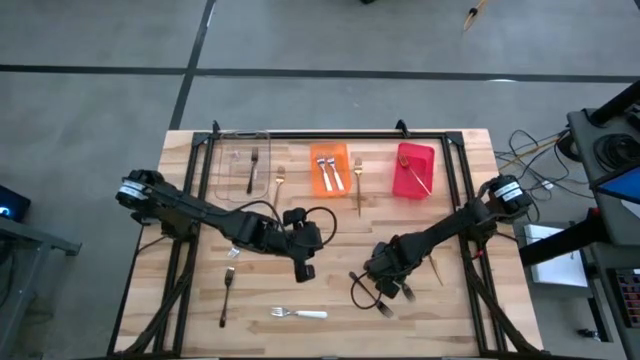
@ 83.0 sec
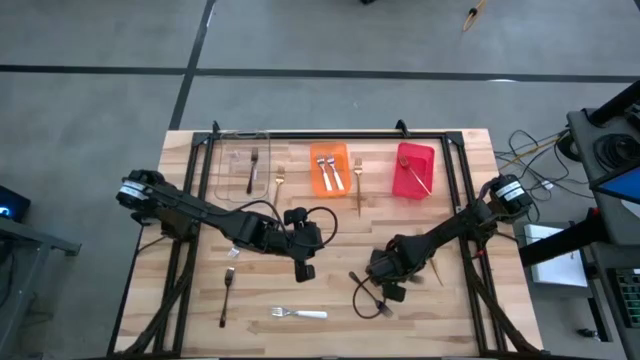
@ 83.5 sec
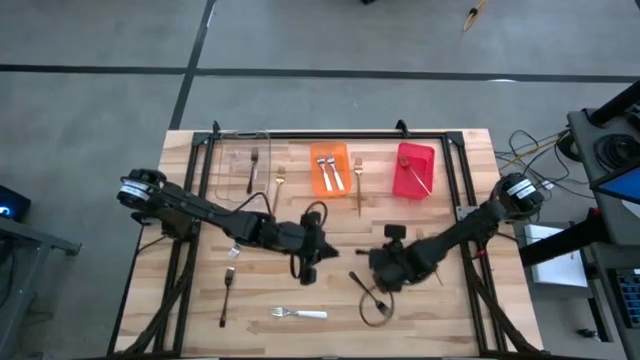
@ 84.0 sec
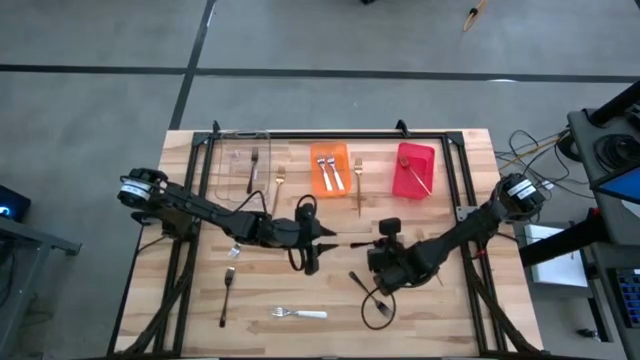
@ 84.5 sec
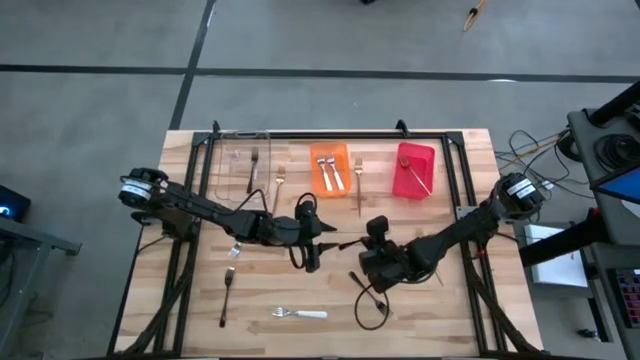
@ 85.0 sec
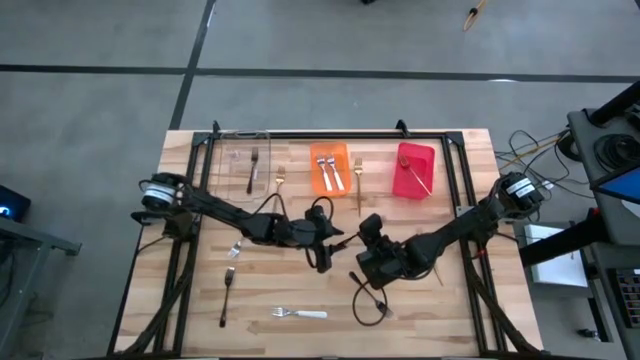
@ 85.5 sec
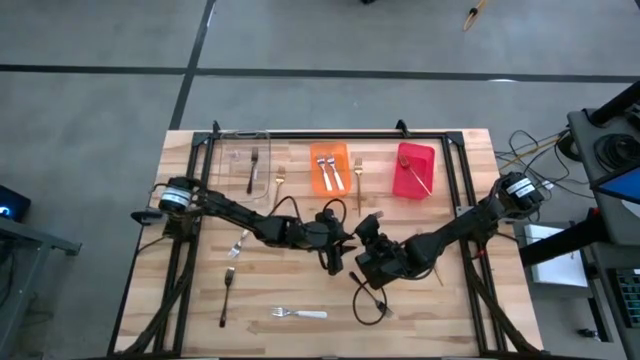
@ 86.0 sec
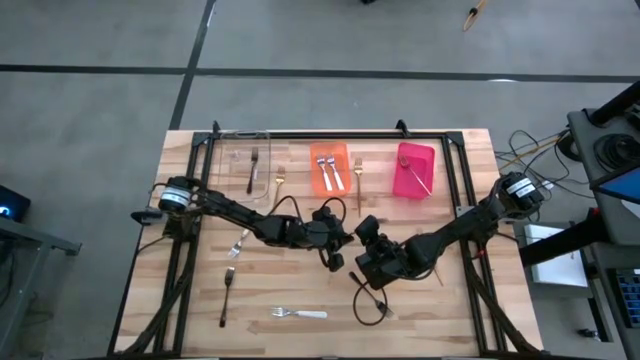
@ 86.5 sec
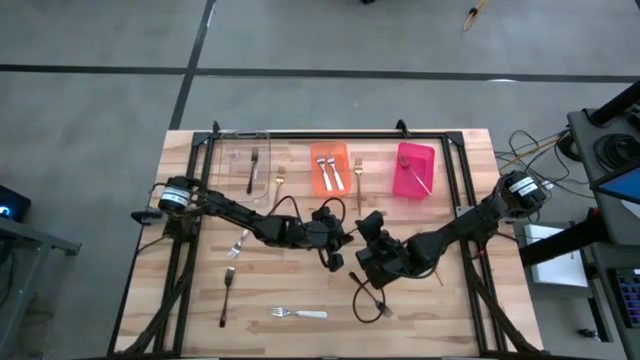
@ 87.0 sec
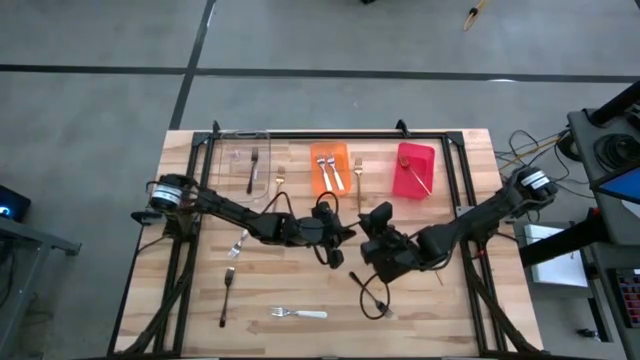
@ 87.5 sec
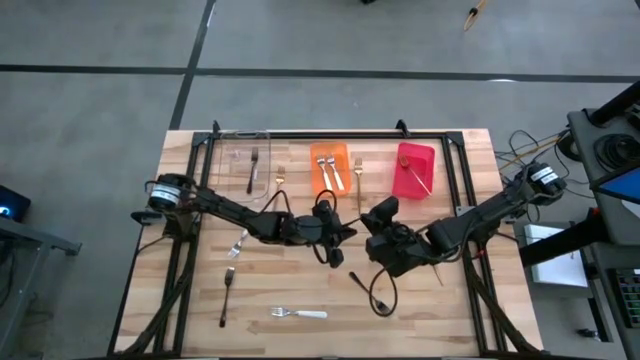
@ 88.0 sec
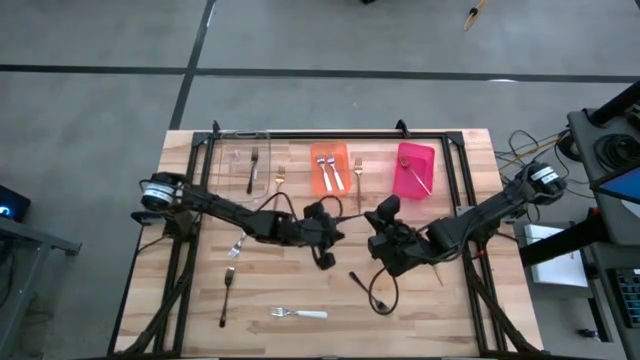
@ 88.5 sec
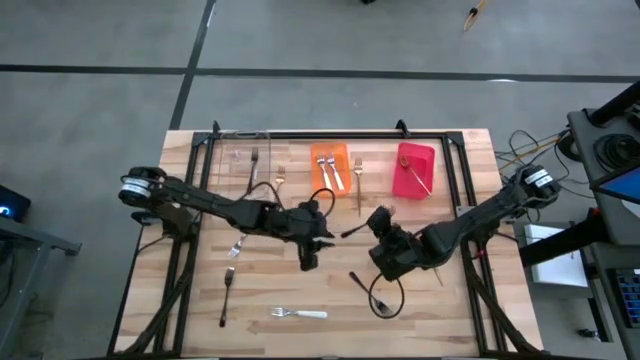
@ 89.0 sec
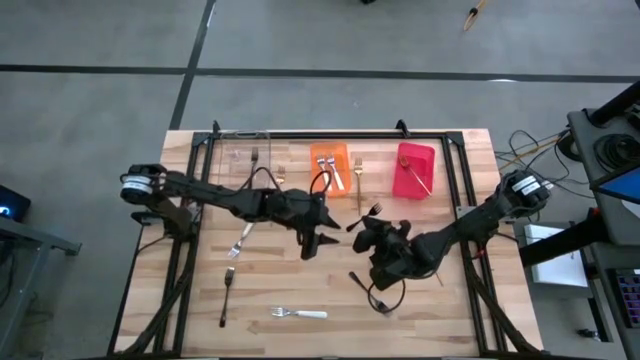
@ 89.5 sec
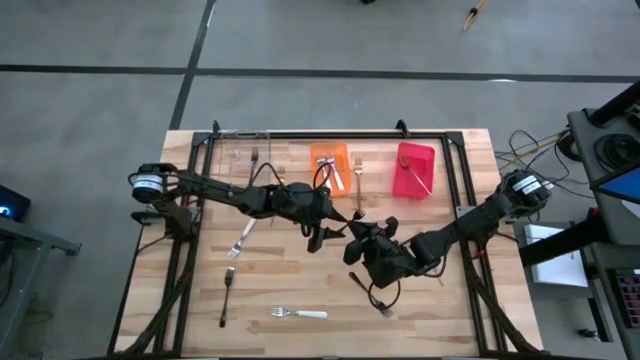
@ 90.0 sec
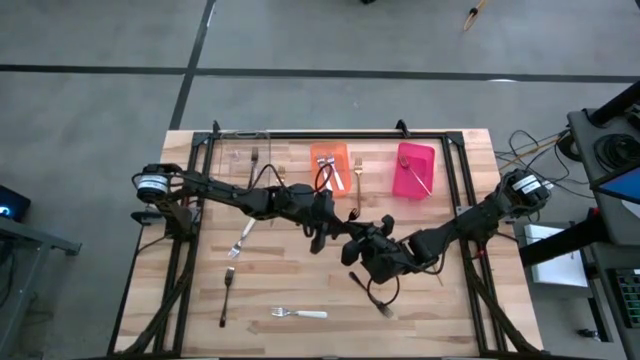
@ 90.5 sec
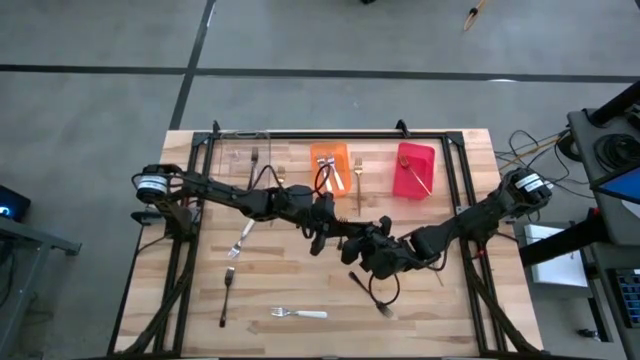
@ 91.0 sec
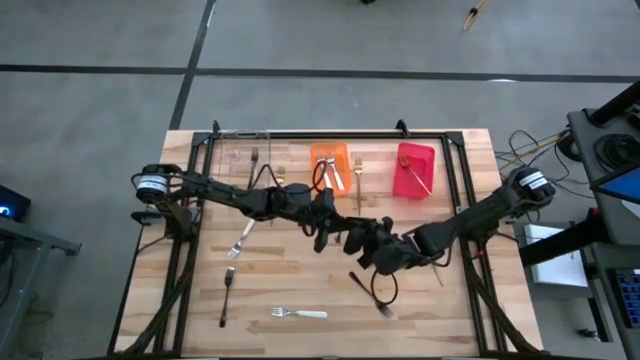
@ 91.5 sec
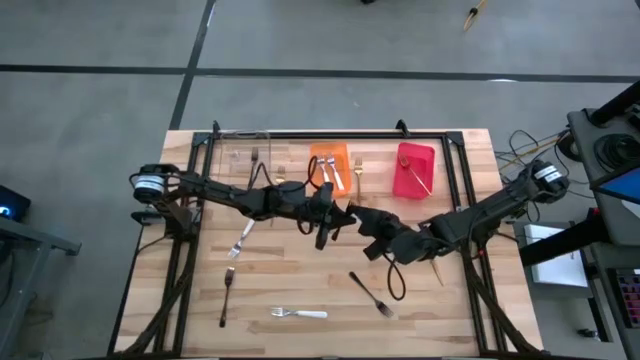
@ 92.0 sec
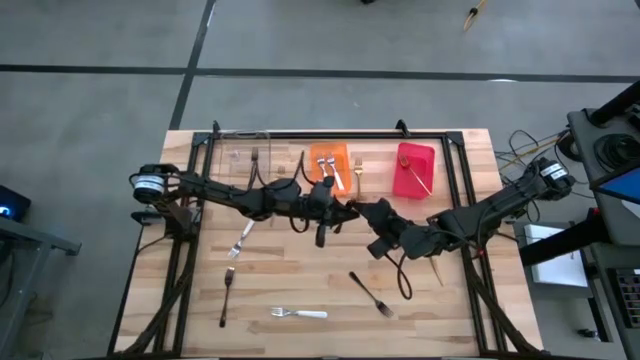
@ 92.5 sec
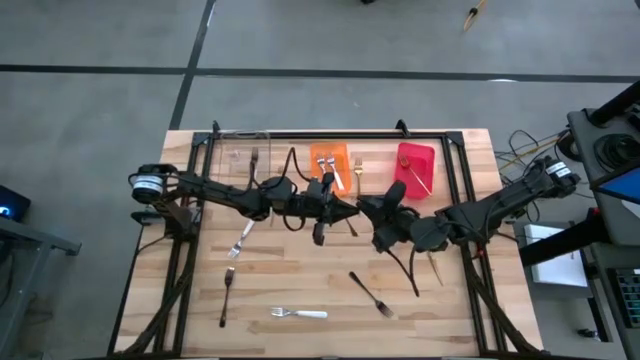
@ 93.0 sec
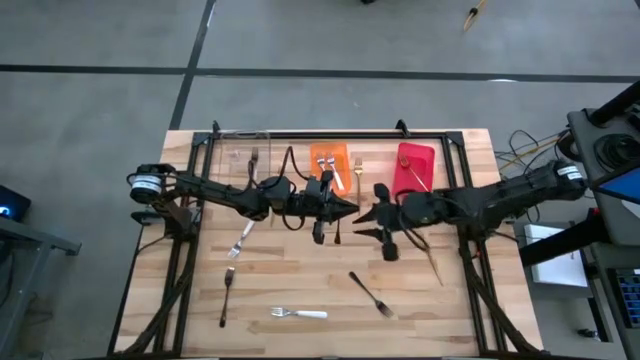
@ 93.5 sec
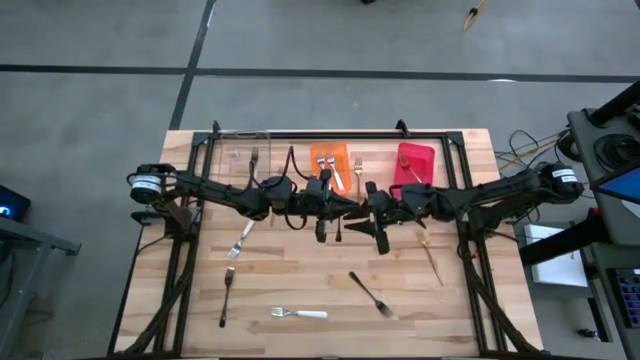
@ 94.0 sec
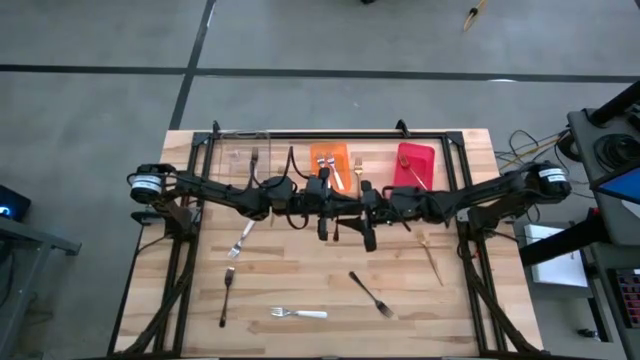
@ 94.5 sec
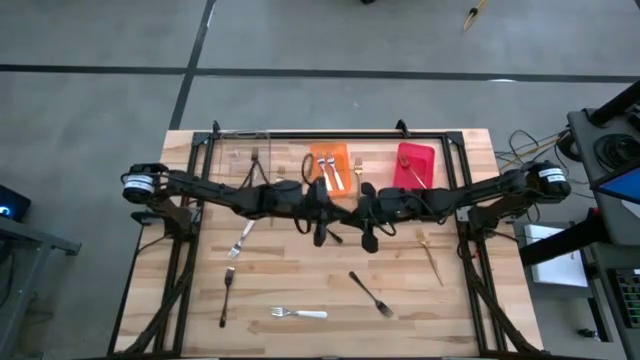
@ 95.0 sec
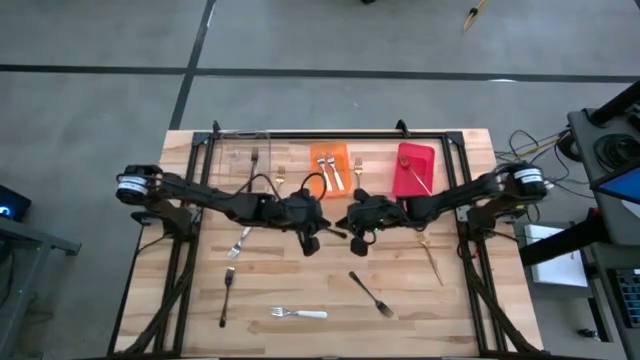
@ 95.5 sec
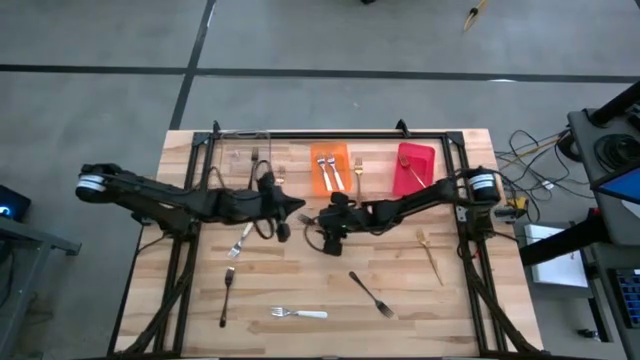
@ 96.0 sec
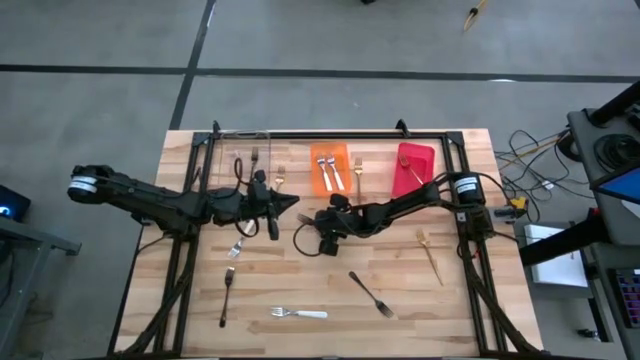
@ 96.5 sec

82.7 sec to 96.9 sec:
Task: Sort silverware by color (type)
Put the right black fork into the transparent bin

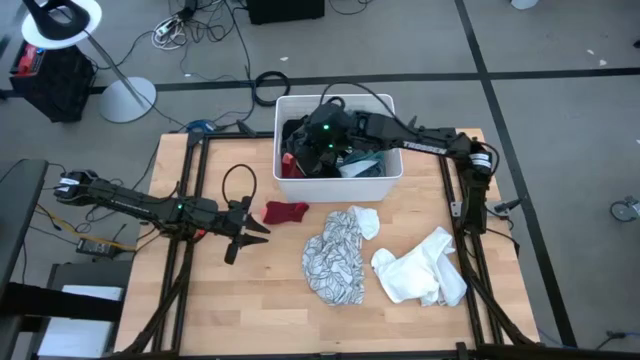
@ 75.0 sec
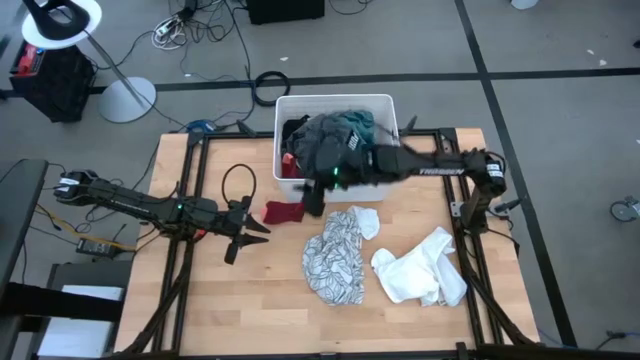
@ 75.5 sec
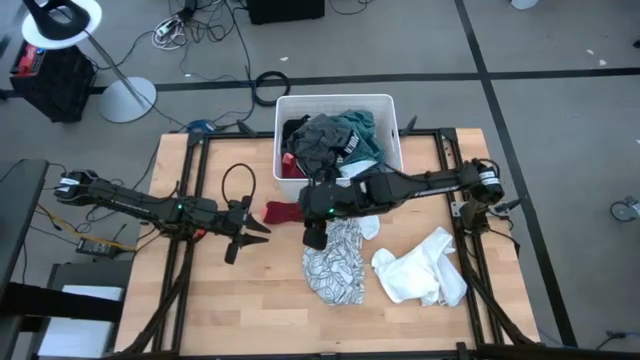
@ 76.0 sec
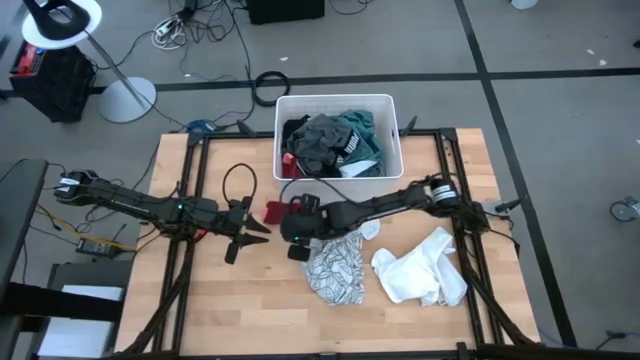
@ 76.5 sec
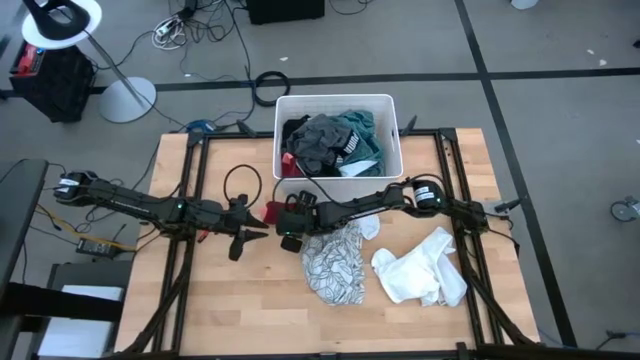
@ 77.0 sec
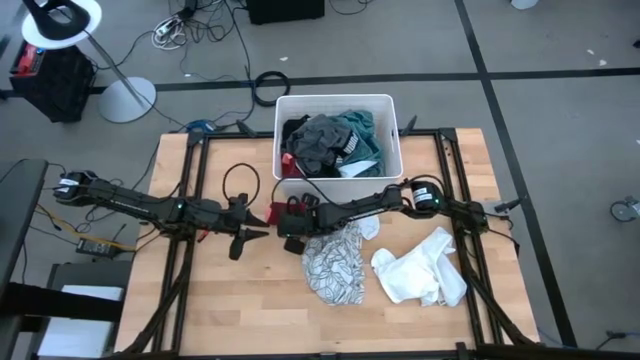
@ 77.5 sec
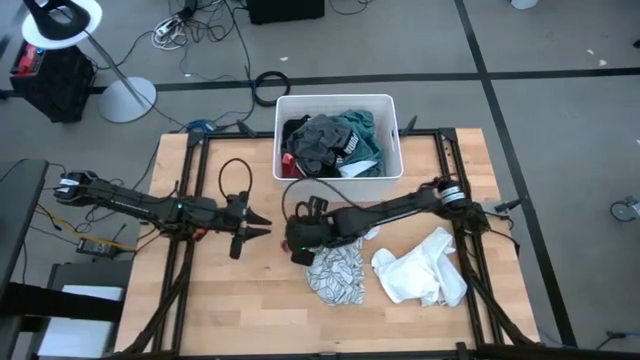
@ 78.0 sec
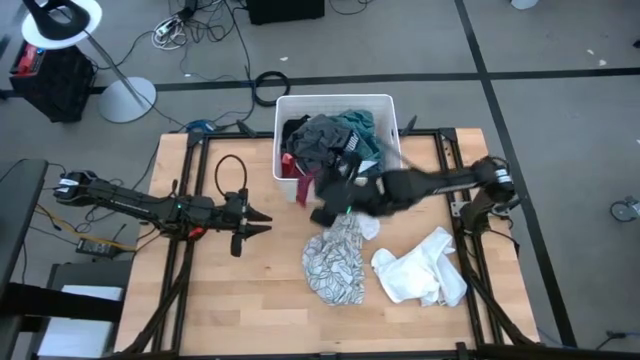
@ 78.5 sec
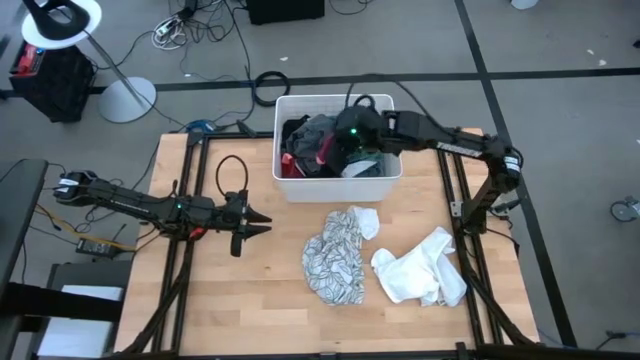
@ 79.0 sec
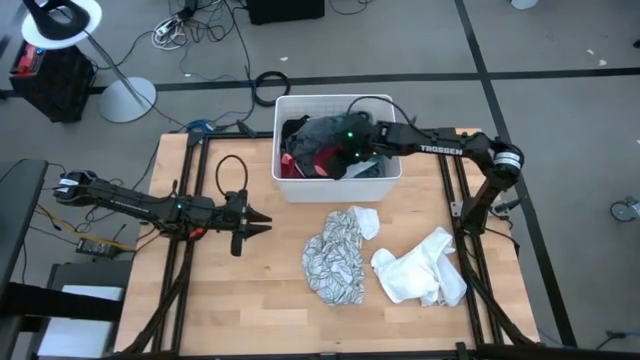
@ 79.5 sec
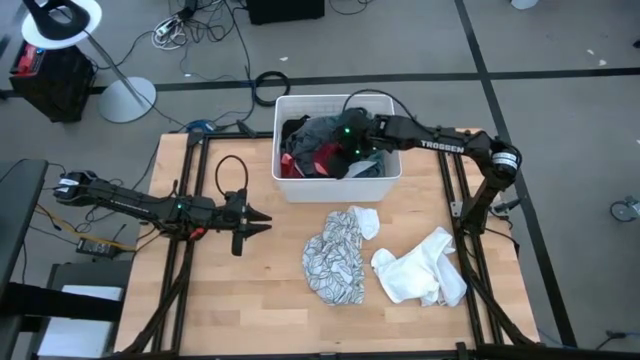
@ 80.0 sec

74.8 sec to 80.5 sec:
Task: Sort clothes
Put the red sock into the white laundry bin
